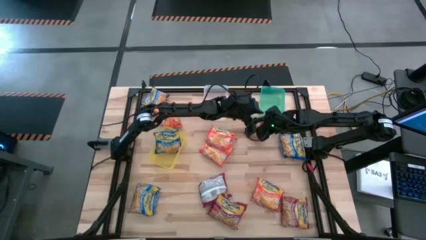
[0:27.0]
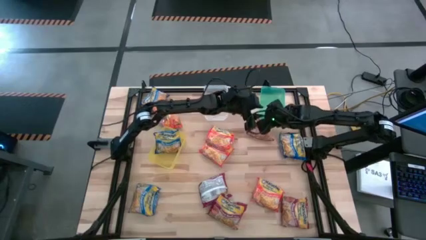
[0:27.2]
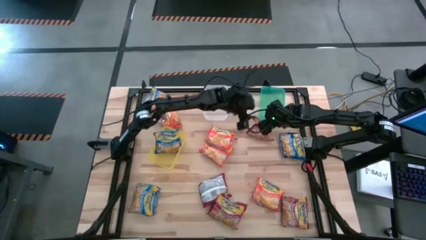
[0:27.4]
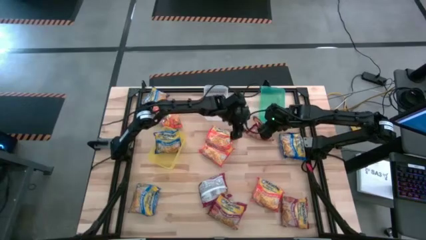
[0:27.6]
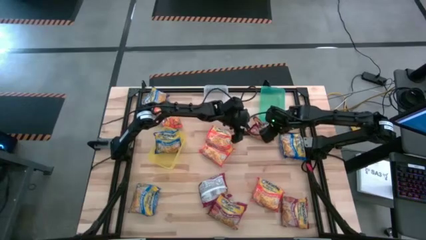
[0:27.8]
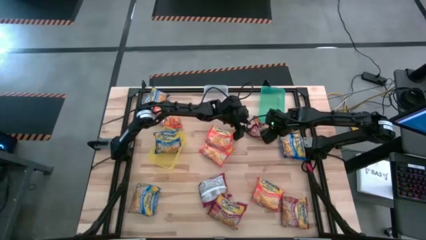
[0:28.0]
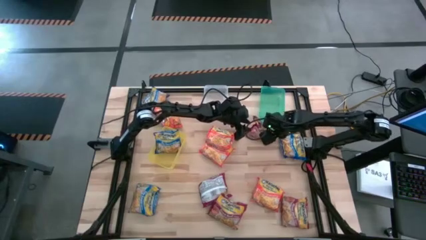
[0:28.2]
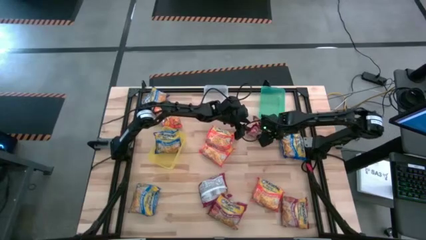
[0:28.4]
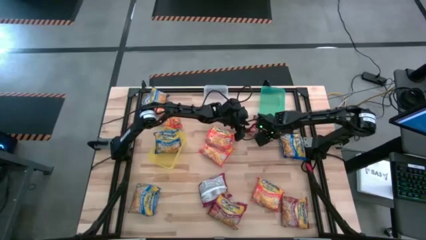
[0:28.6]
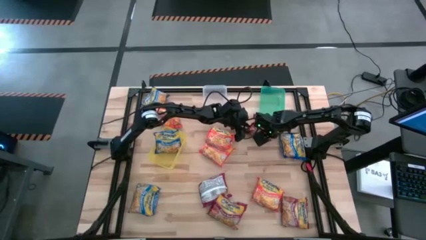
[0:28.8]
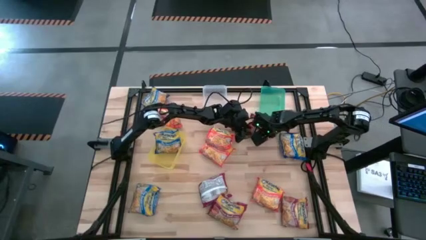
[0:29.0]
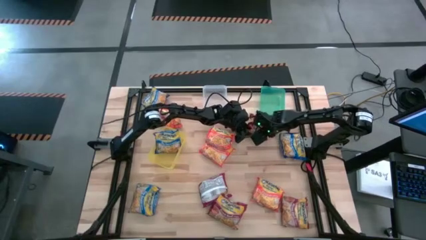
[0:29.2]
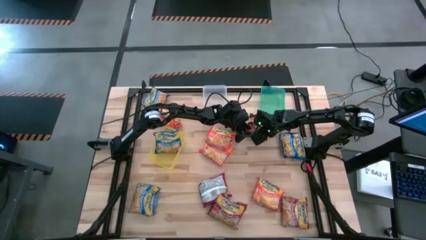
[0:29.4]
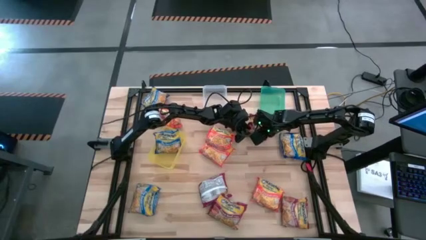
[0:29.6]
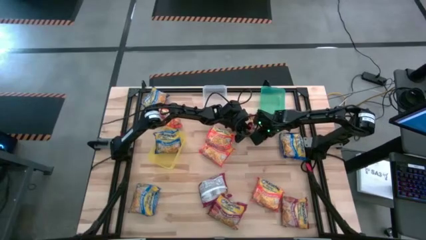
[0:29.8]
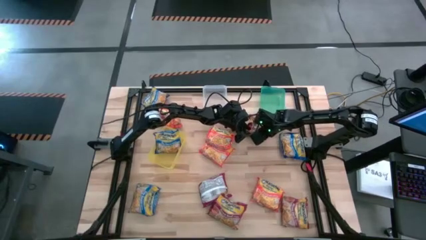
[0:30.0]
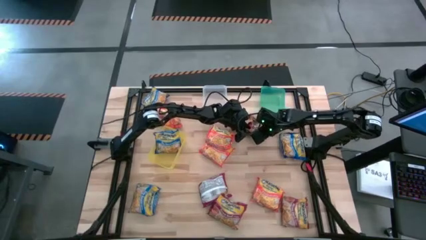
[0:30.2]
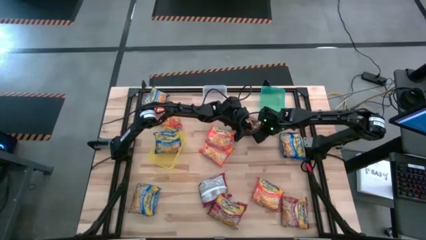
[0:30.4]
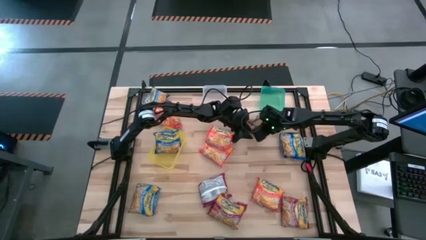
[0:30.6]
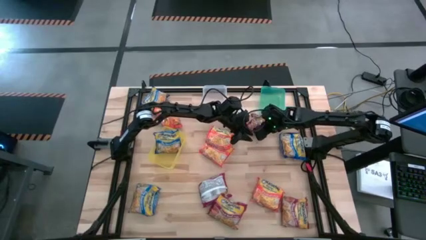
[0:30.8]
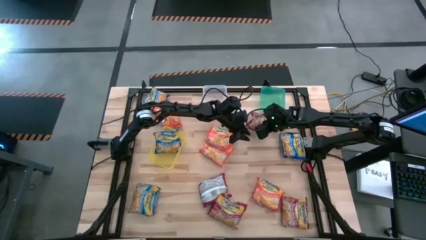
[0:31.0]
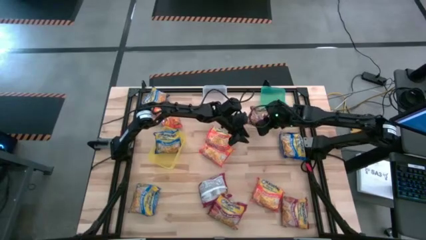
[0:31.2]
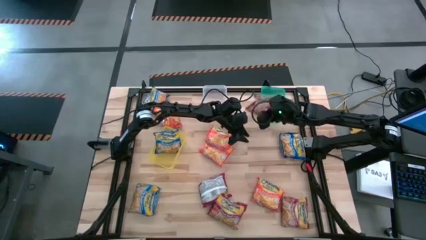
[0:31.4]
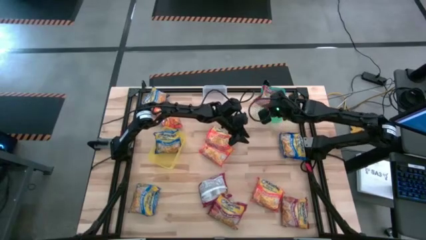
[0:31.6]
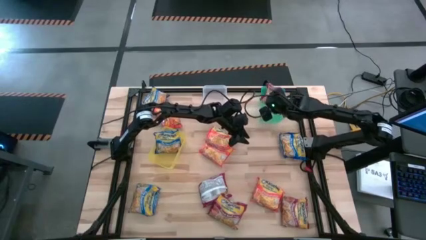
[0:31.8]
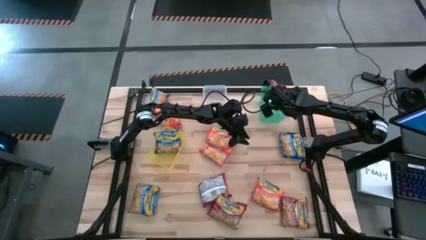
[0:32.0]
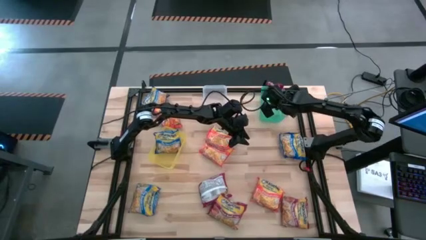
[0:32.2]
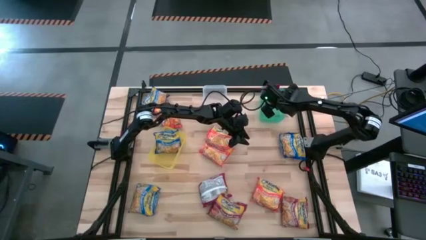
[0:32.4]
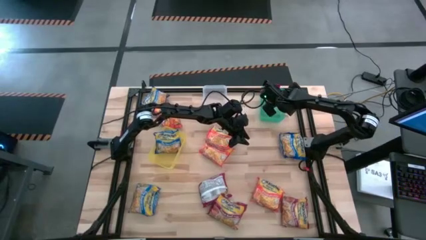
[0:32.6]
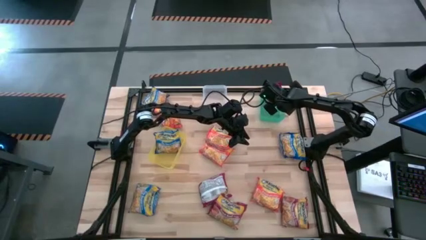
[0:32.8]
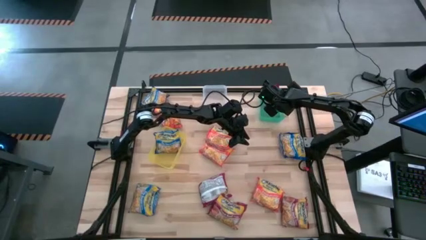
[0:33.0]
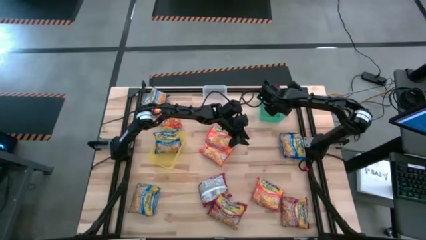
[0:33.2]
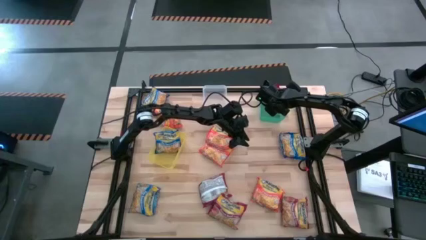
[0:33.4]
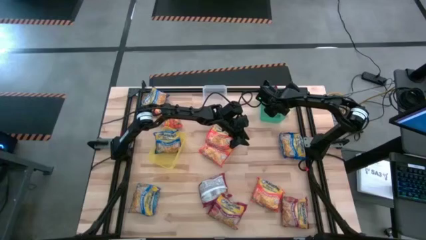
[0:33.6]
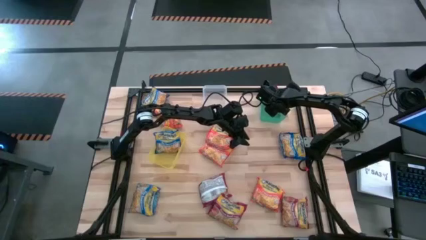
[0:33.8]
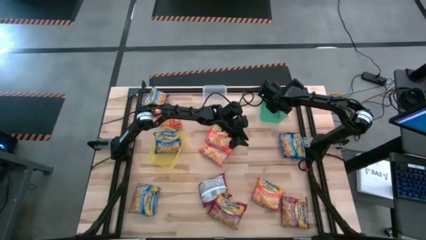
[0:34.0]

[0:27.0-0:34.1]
Task: Sort Maruchan noodles
Put the red noodle pack into the green bin

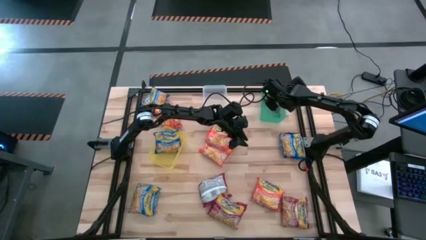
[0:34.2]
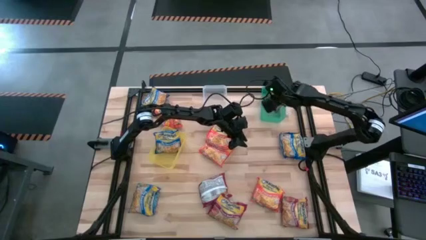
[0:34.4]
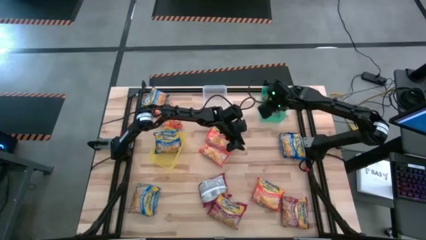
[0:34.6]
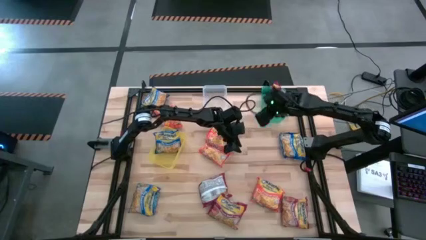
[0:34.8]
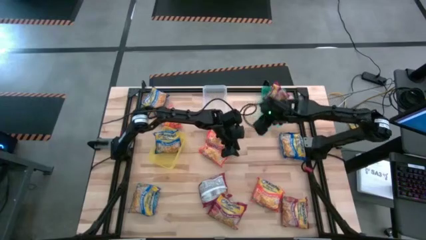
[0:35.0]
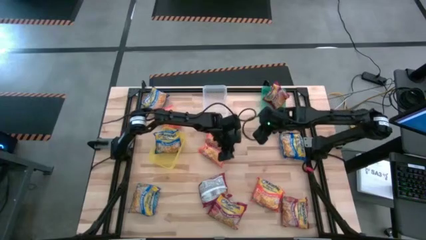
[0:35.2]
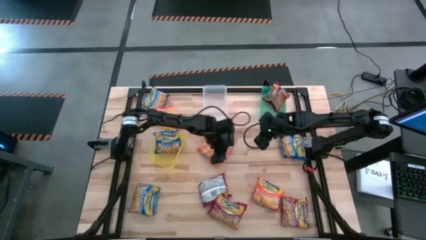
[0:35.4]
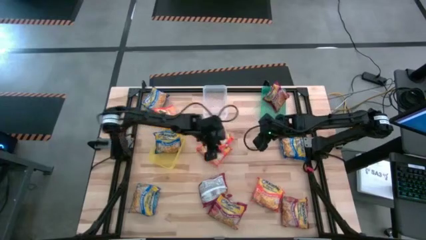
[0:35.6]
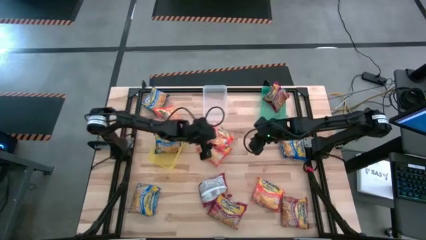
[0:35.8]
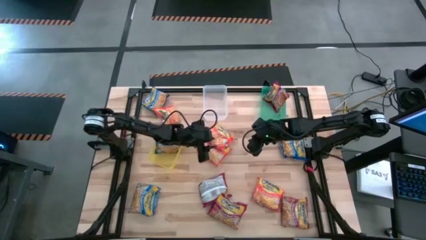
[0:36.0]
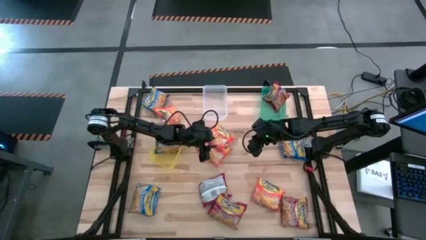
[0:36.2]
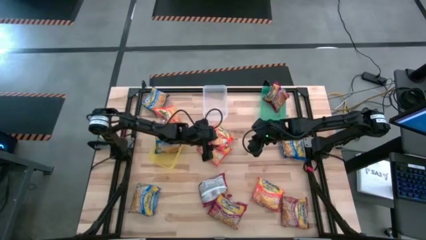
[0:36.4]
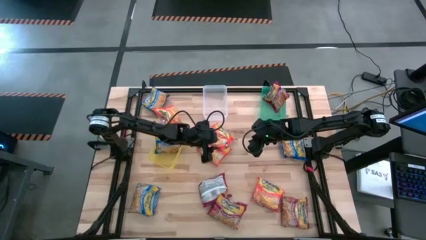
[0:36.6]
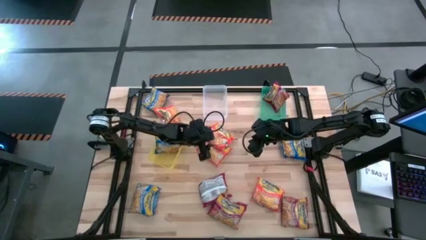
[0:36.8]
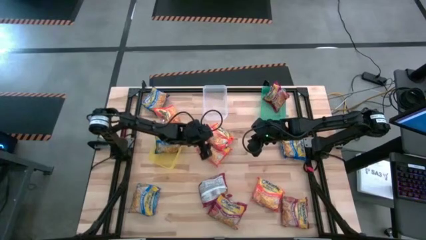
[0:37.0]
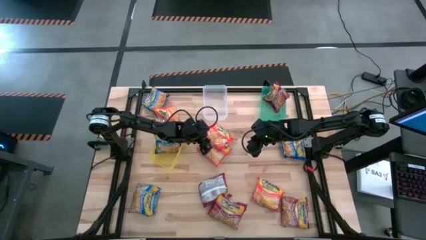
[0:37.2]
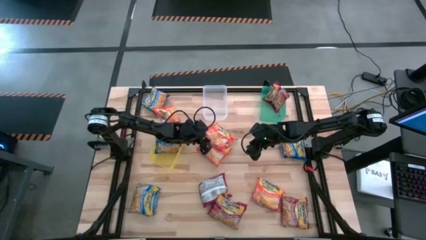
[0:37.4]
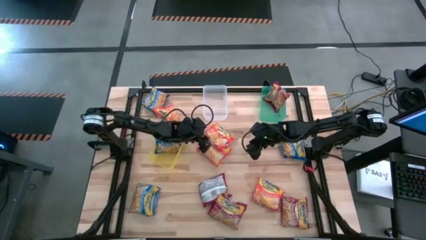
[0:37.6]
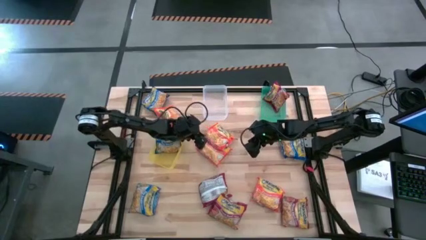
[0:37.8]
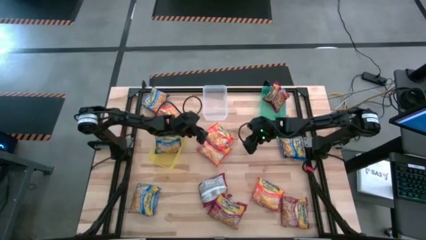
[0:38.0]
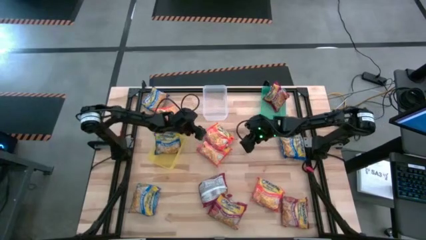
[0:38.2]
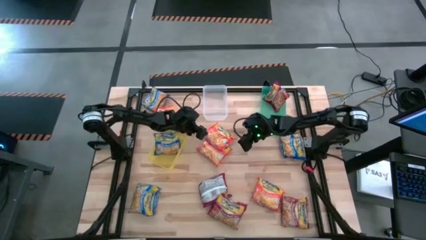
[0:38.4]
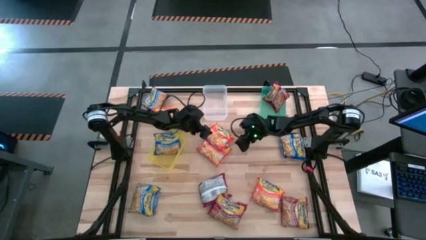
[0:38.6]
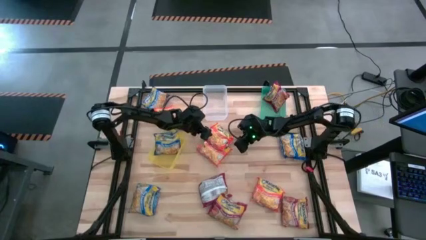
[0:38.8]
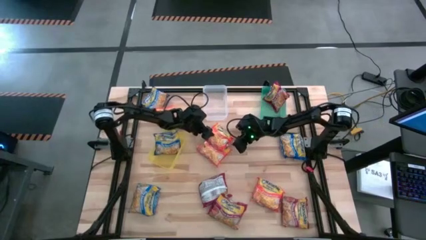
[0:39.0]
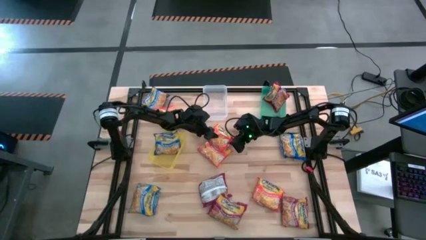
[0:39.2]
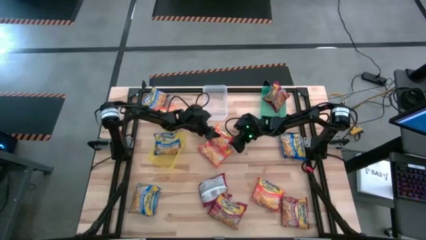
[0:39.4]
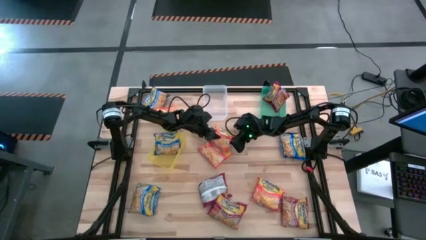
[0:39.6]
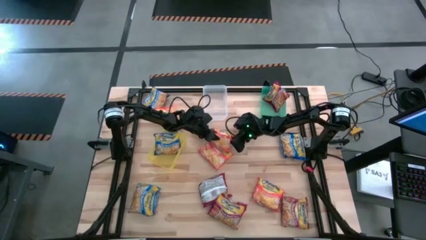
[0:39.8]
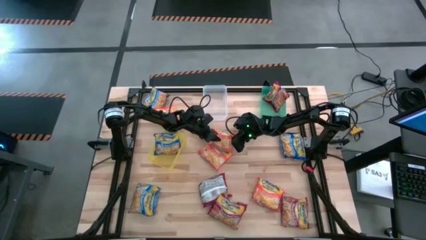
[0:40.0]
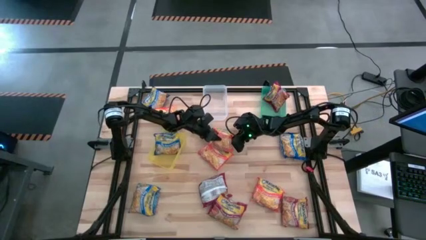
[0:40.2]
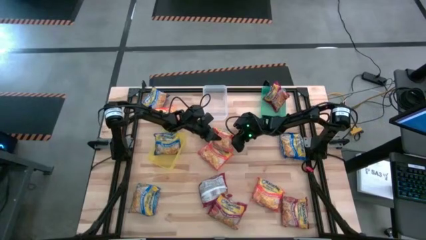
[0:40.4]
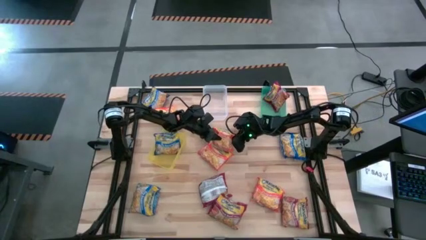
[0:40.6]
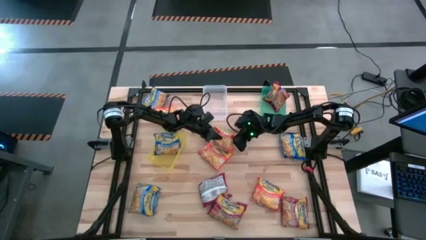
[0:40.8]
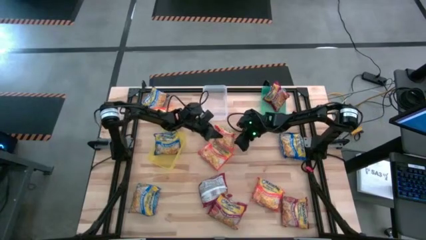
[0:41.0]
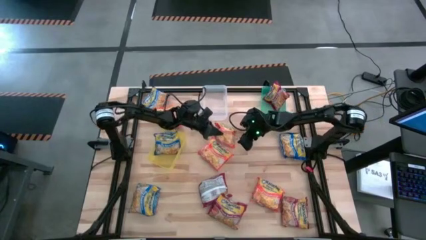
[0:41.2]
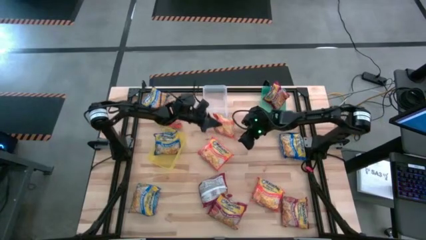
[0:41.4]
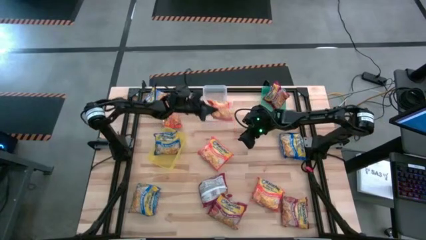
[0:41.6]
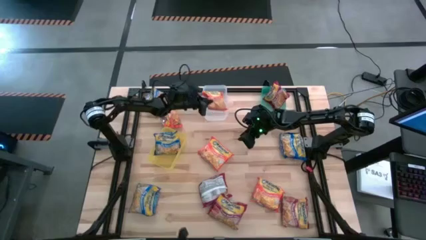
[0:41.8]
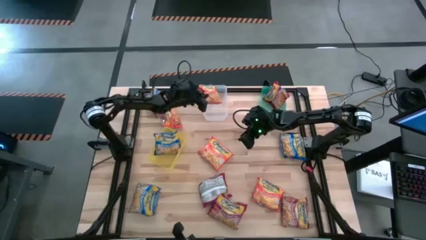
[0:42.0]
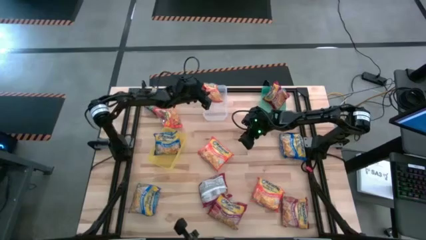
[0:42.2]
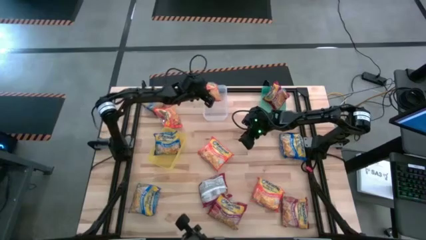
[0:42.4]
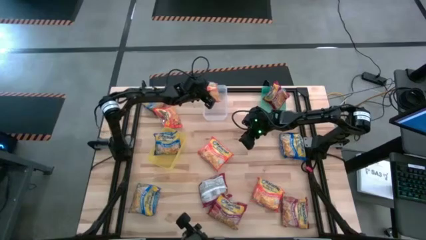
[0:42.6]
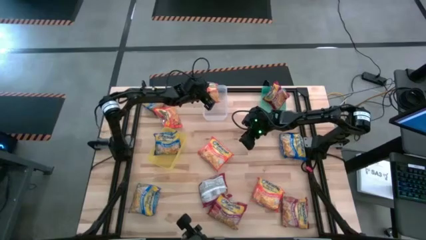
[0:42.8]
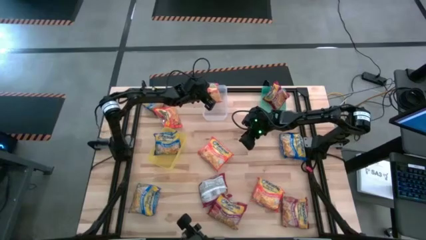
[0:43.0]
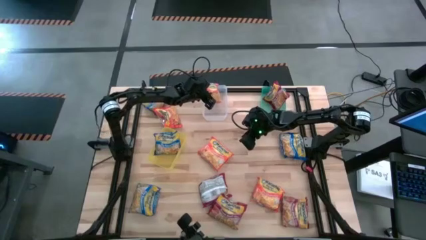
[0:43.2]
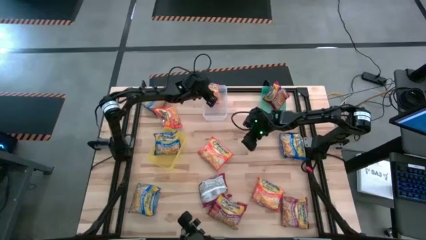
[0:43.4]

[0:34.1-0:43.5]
Put the orange noodle pack into the transparent bin
